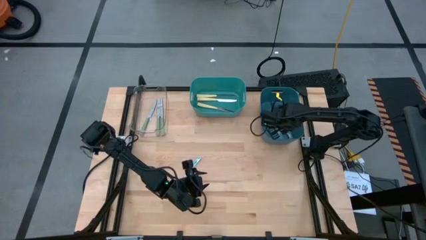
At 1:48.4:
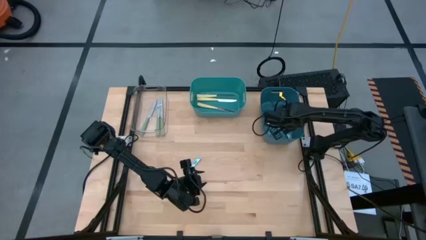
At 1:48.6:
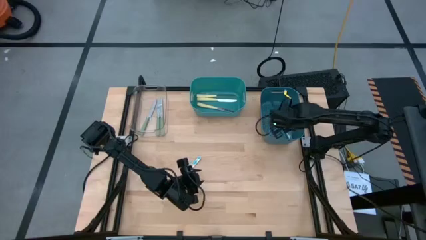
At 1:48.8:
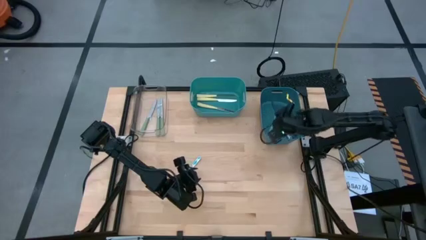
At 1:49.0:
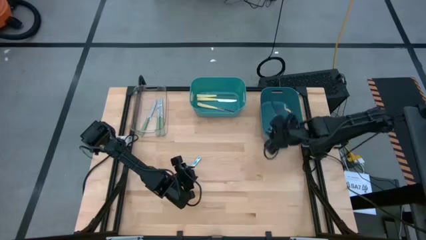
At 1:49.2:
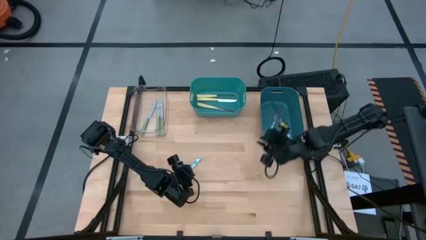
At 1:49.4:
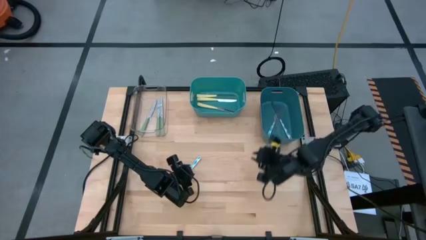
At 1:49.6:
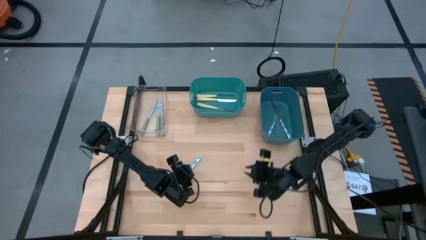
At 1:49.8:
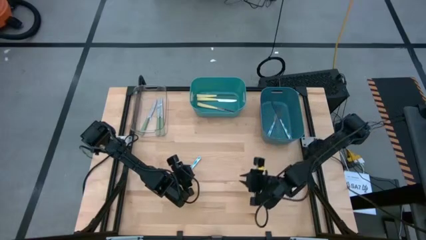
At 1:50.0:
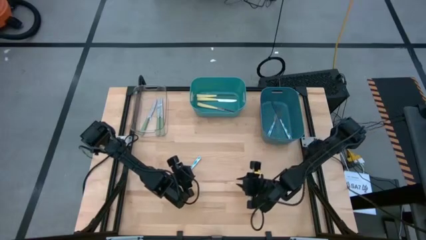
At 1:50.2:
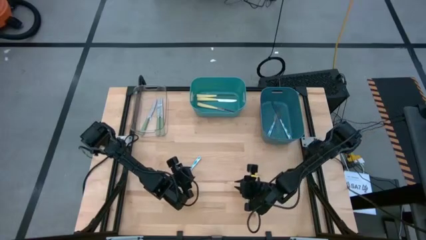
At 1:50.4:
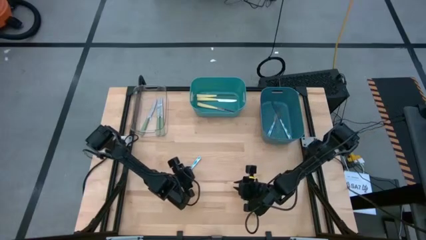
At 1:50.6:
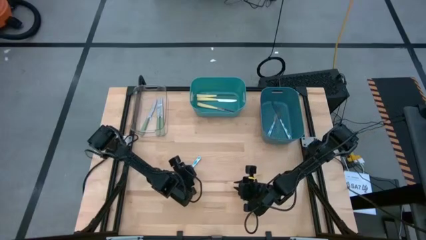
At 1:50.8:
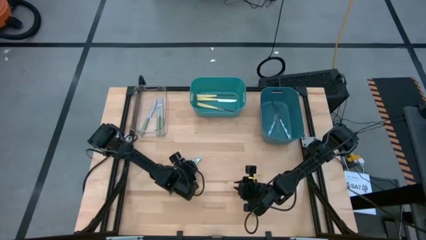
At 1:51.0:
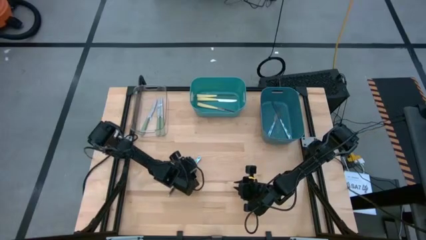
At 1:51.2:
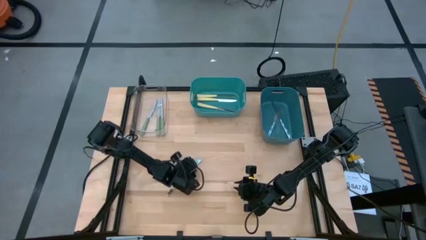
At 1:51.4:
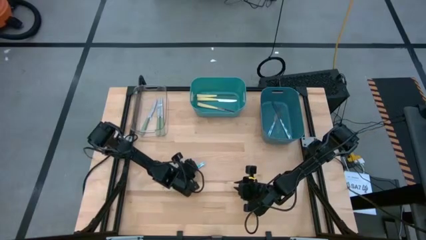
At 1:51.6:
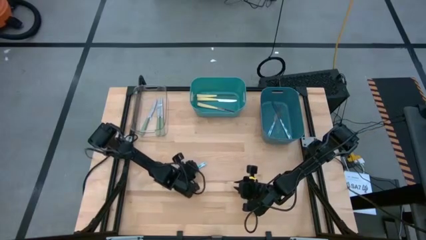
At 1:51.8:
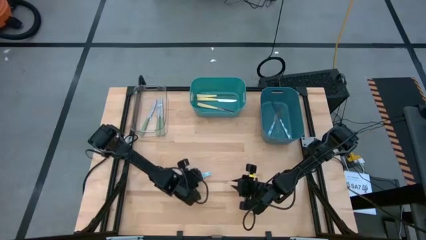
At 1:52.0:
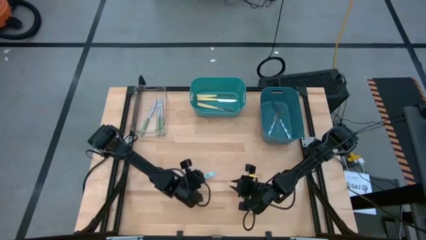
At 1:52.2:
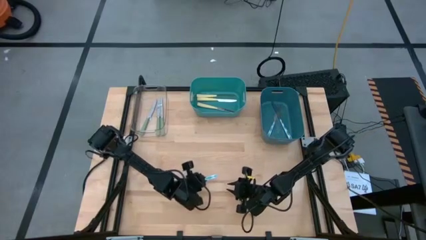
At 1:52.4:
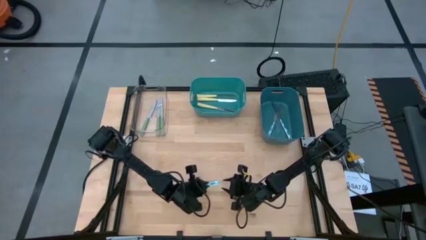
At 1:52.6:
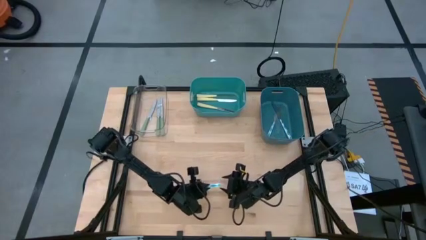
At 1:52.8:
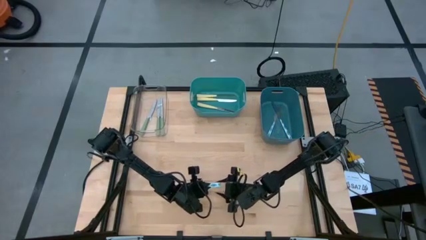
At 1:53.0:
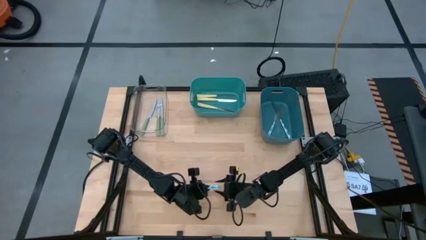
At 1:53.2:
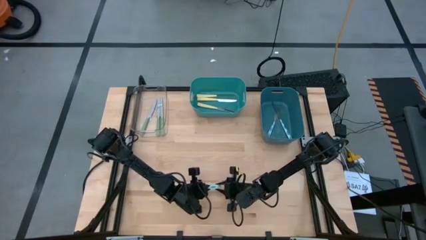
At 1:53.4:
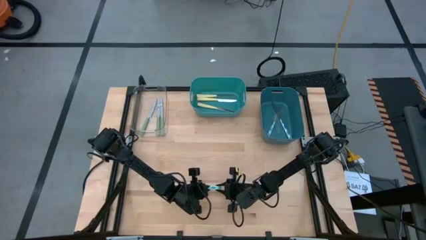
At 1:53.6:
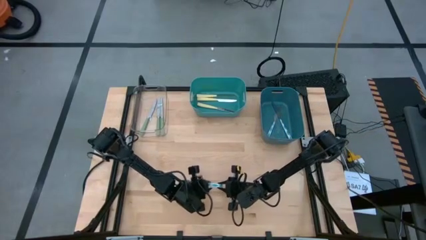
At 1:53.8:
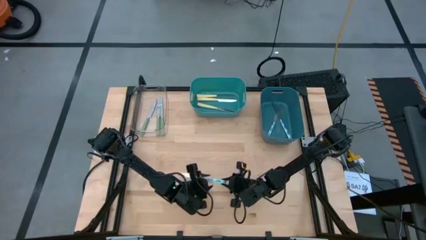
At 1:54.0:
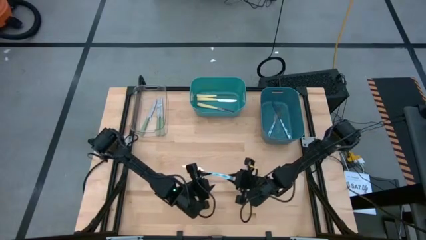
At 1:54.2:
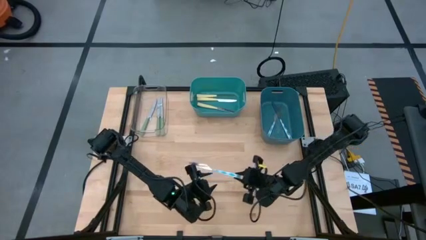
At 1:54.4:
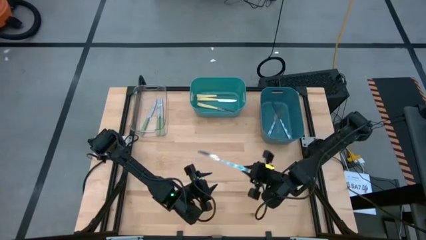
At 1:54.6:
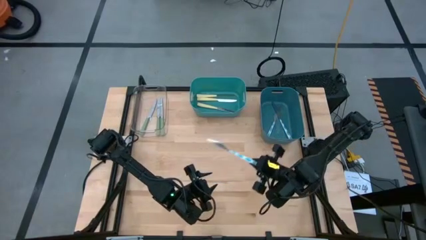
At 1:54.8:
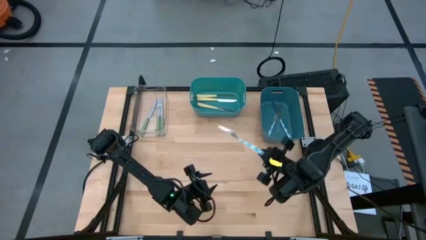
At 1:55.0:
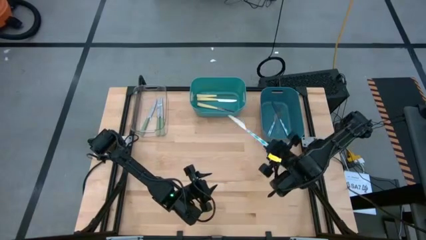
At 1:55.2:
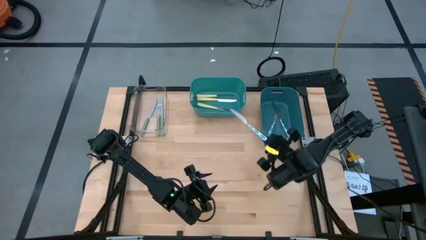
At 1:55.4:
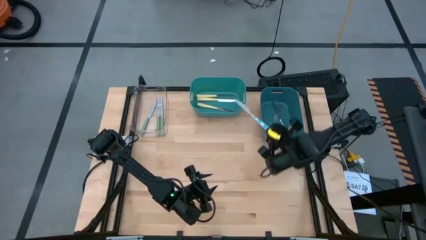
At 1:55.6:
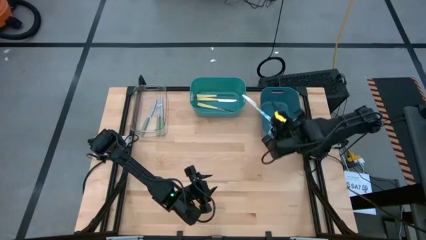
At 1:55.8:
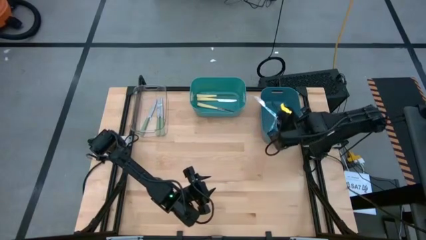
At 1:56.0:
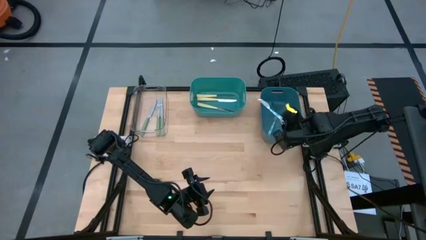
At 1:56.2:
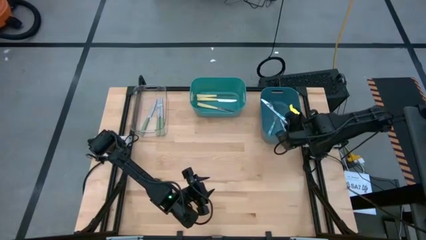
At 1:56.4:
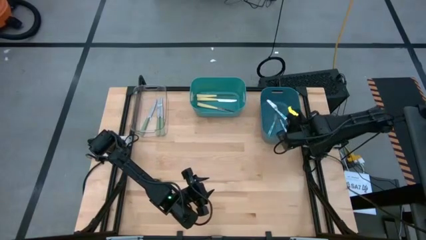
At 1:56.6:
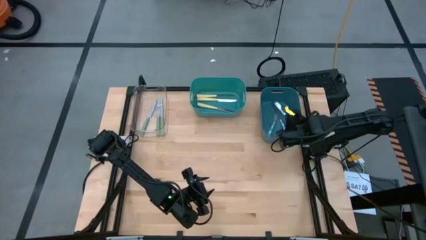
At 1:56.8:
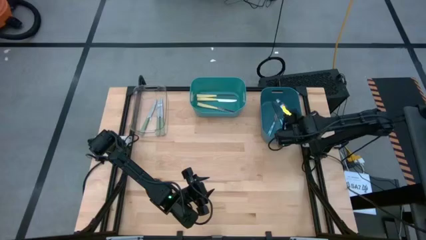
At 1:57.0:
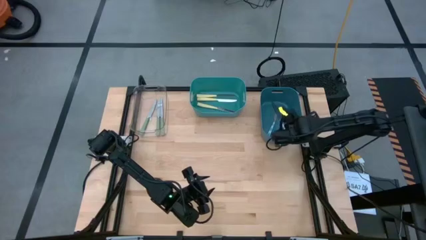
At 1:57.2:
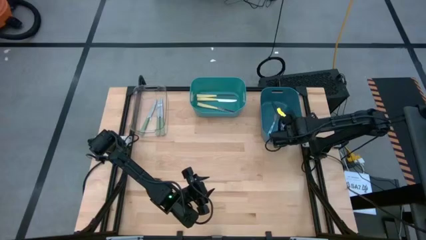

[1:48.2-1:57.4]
Task: Sort silverware by color (type)
Put the blue knife into the blue bin
